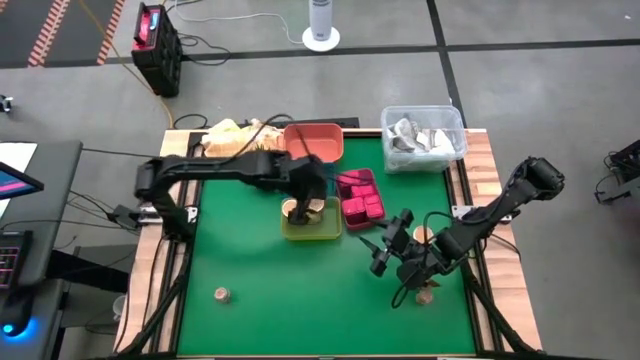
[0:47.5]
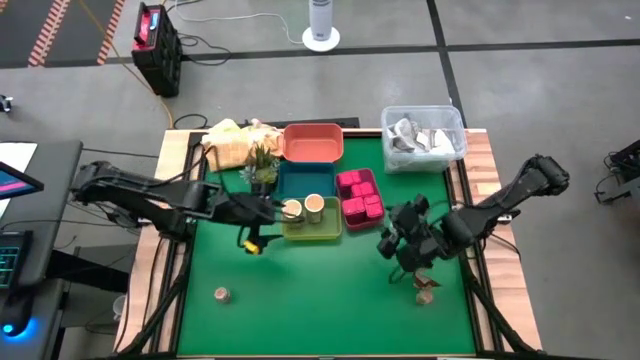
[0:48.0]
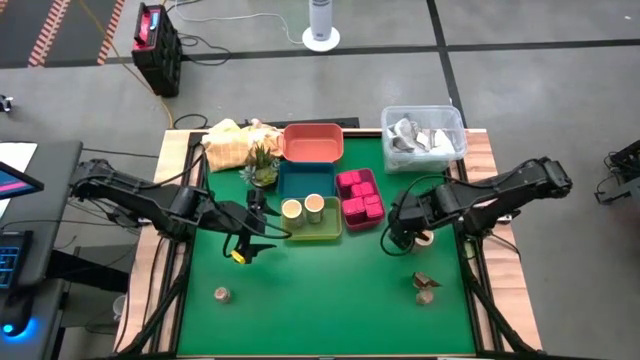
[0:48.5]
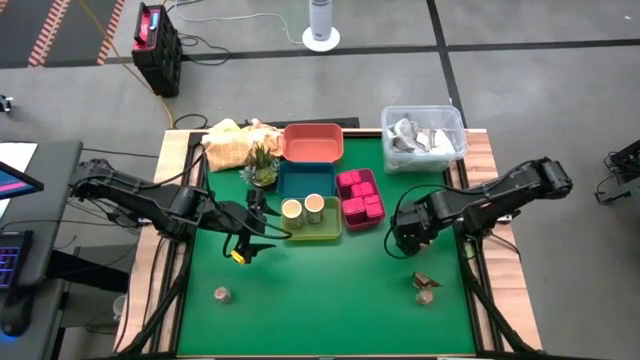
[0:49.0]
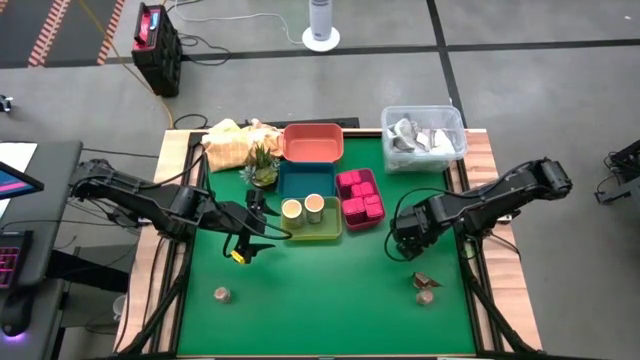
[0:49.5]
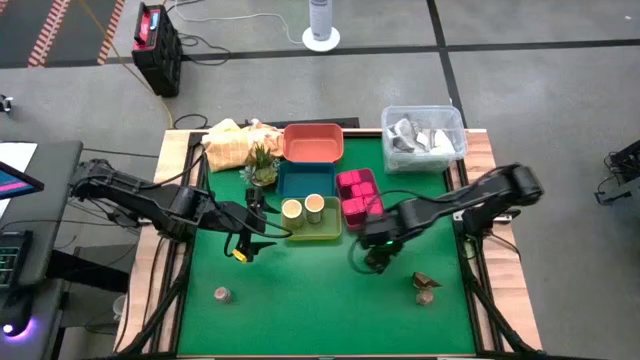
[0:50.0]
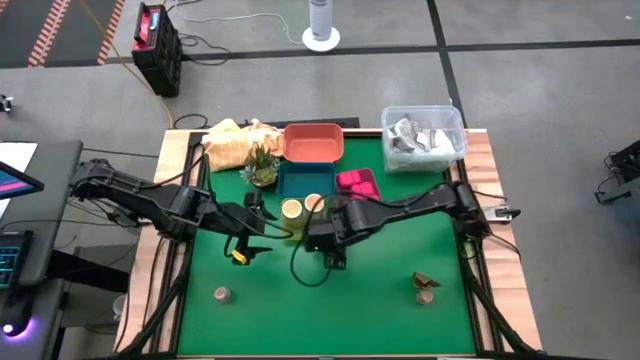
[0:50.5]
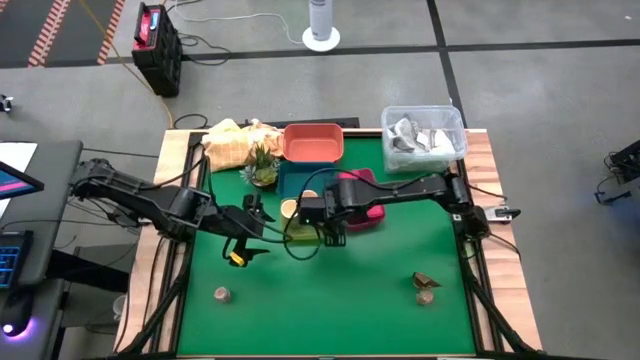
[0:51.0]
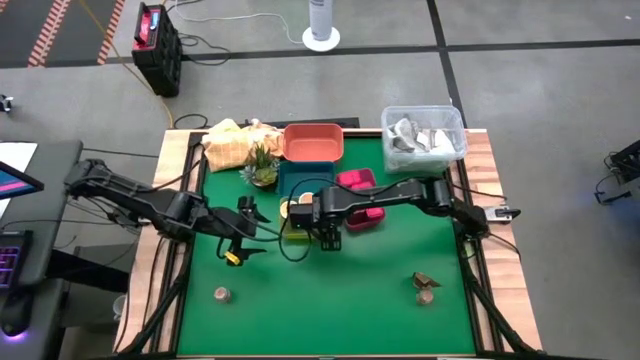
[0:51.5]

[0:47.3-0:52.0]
Task: Sort spices by type
Put the left gold seasoning bottle into the yellow bin

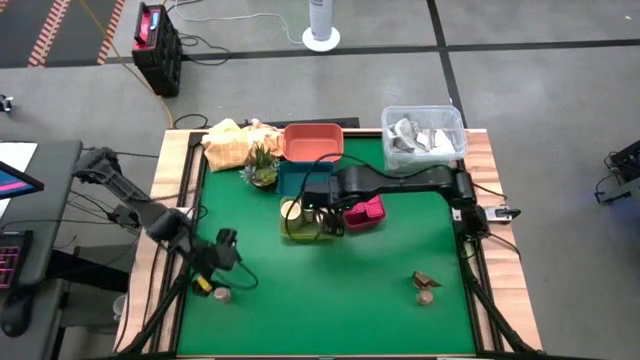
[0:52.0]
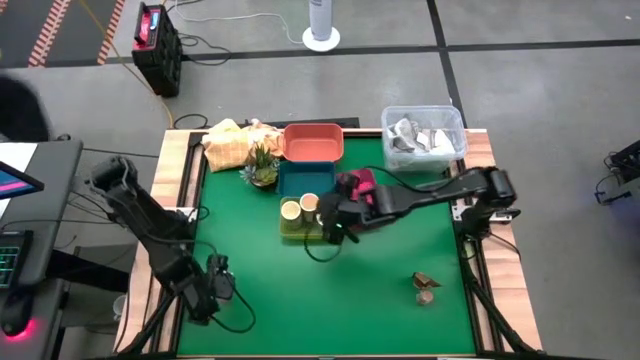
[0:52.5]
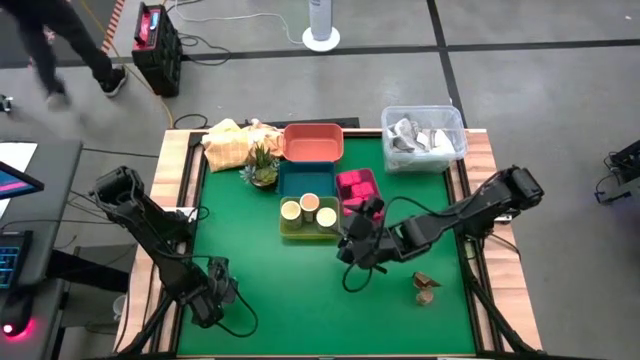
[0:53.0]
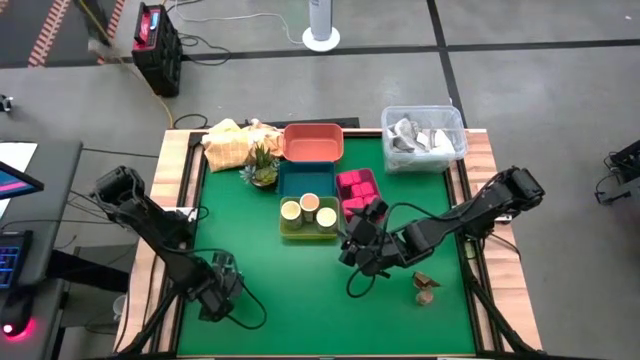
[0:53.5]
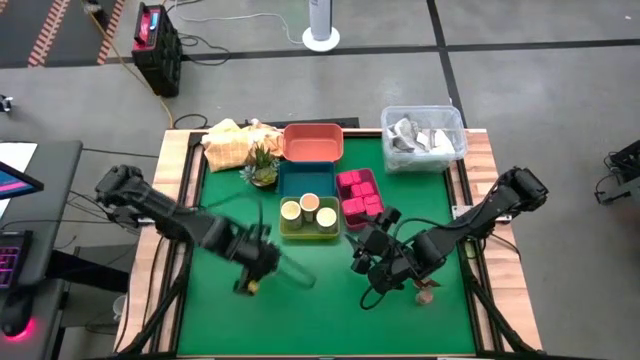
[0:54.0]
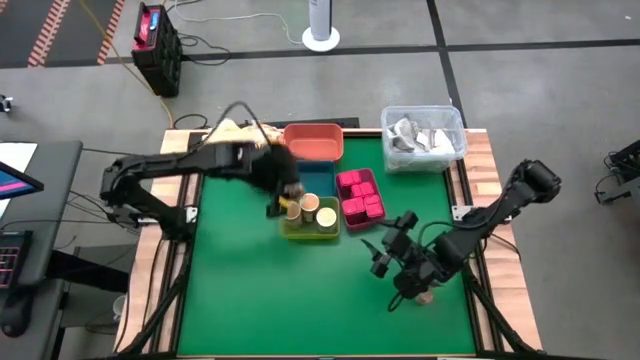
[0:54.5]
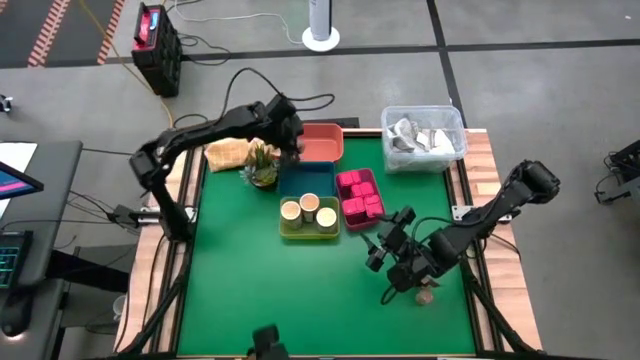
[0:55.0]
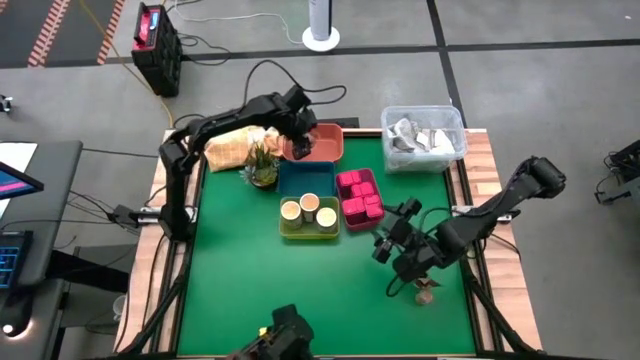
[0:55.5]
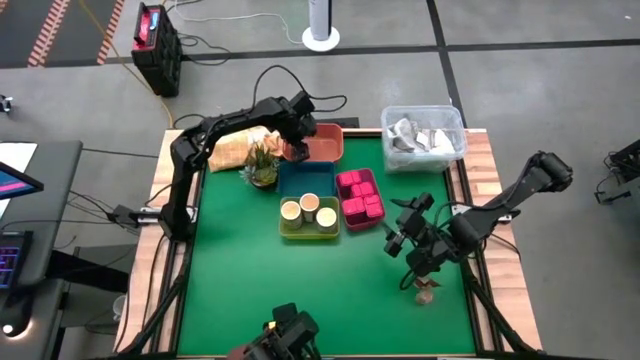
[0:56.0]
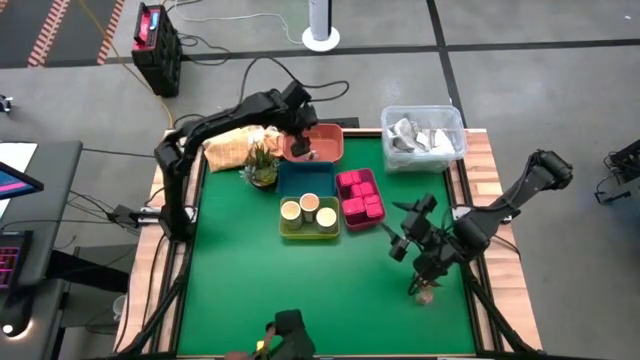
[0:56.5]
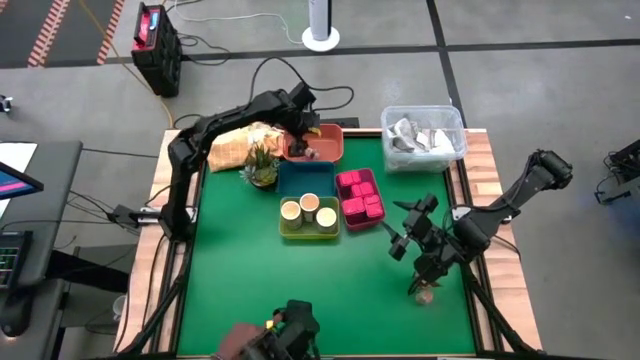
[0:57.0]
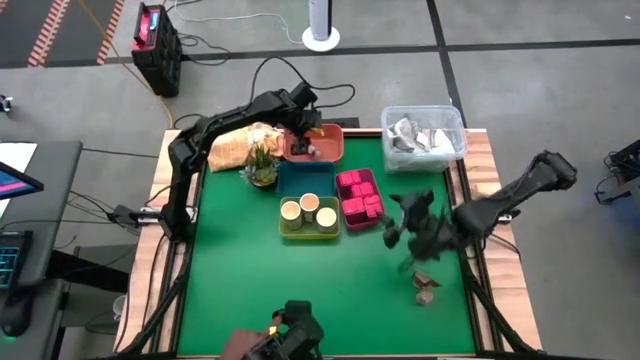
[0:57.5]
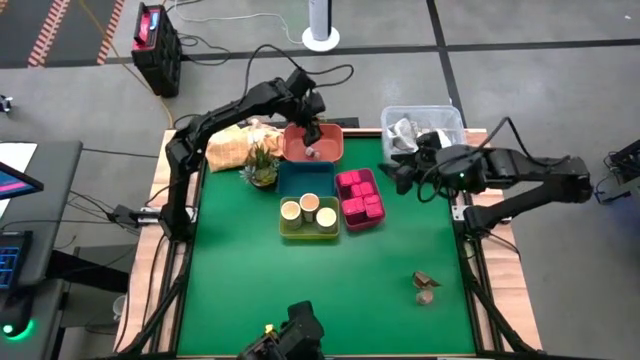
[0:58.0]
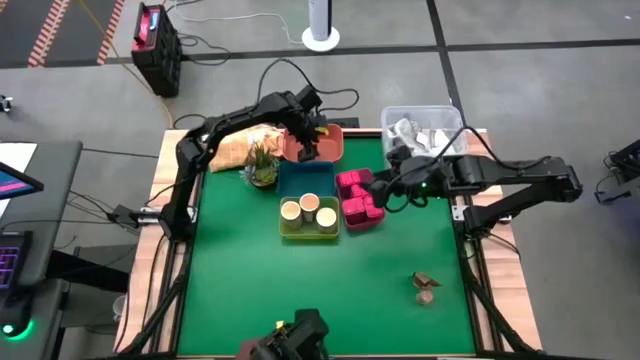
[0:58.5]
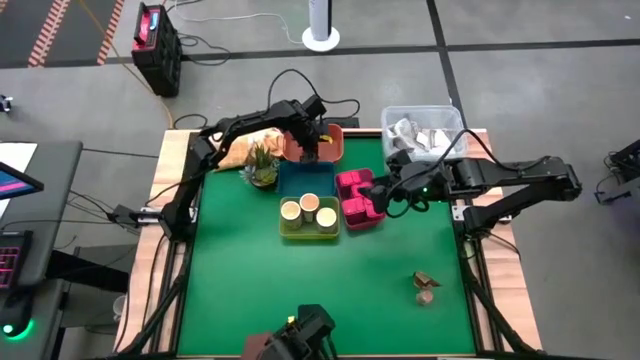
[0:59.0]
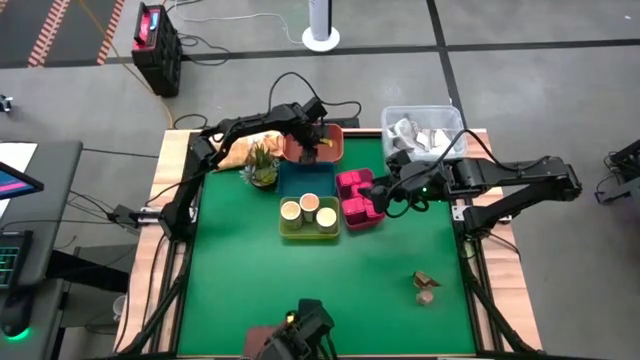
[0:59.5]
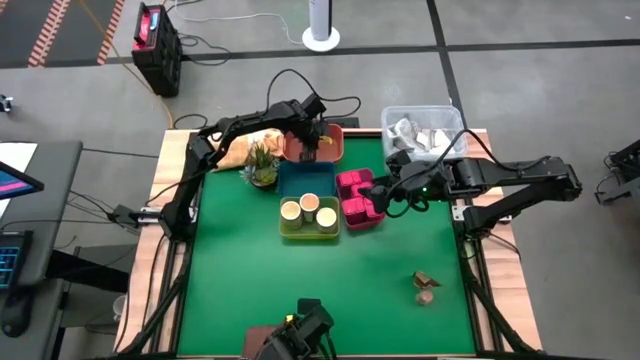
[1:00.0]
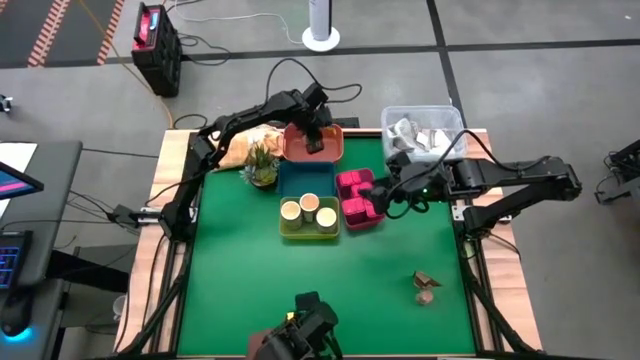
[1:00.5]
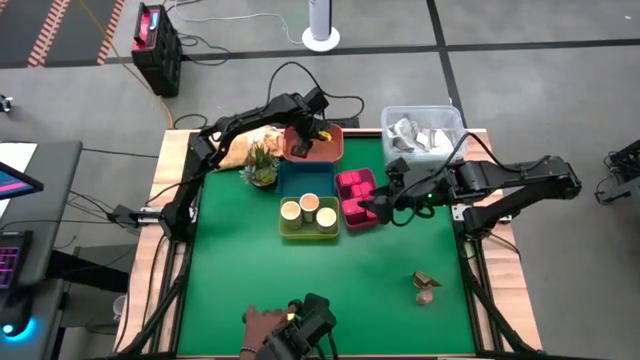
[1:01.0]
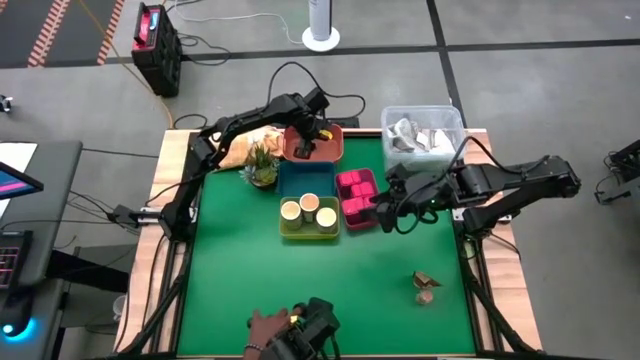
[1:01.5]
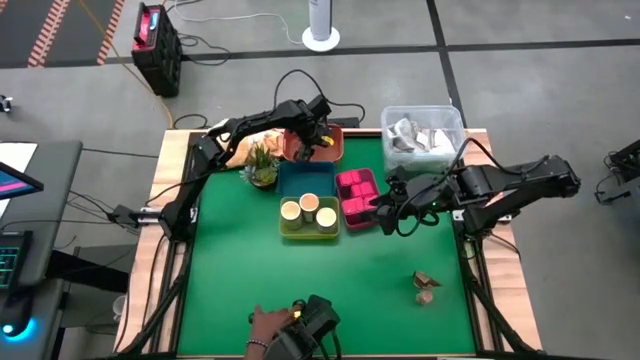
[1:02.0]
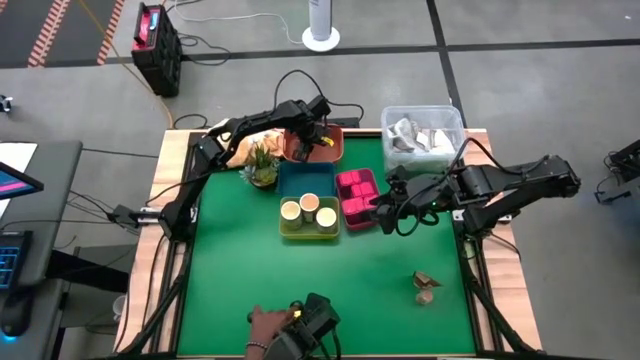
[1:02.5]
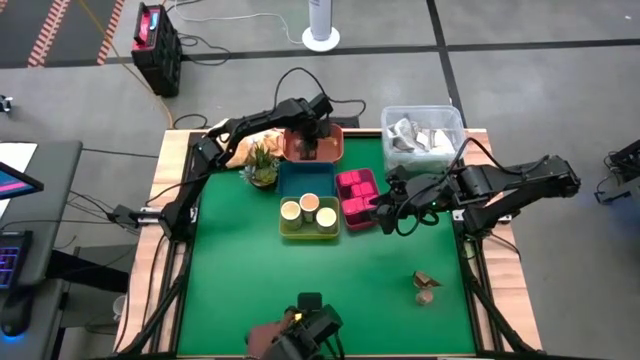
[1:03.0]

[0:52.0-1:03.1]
Put the left brown seasoning bottle into the orange bin

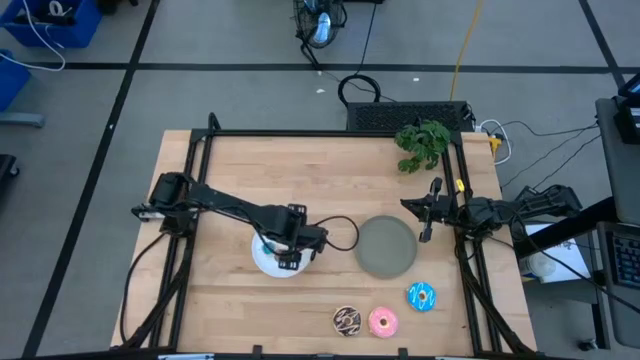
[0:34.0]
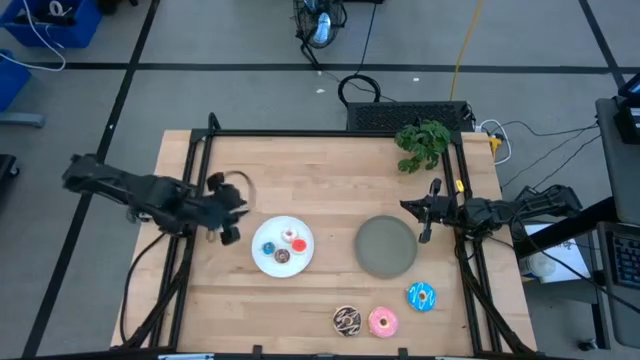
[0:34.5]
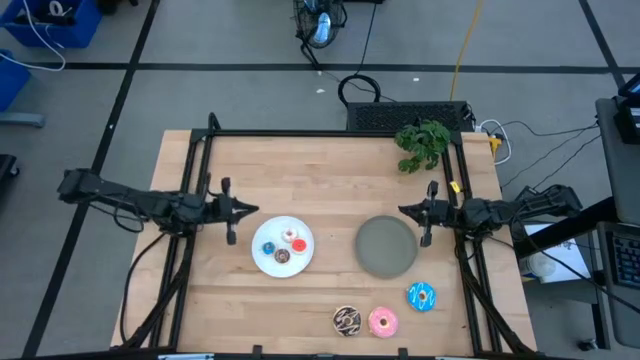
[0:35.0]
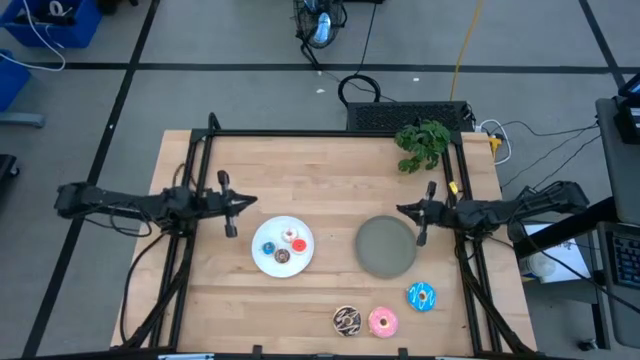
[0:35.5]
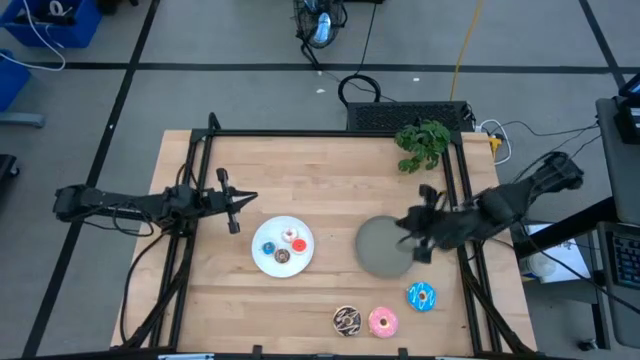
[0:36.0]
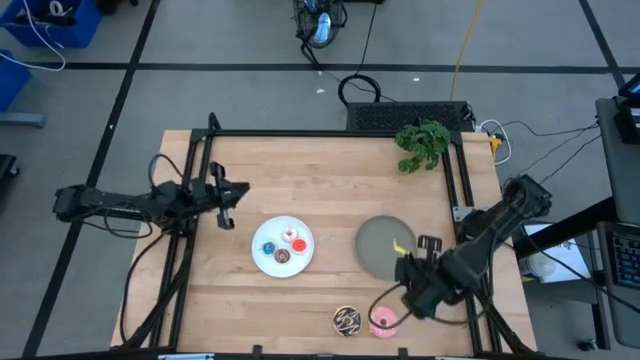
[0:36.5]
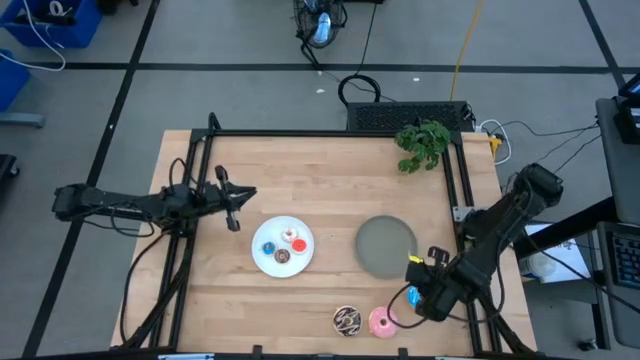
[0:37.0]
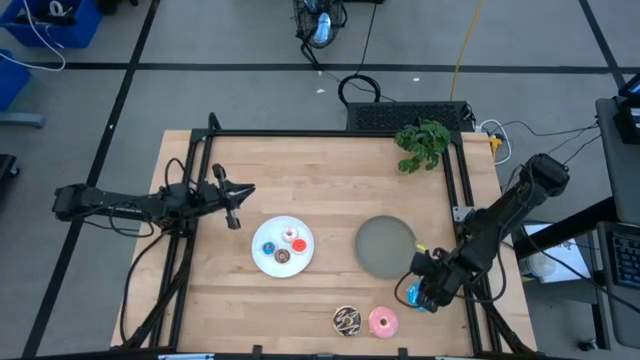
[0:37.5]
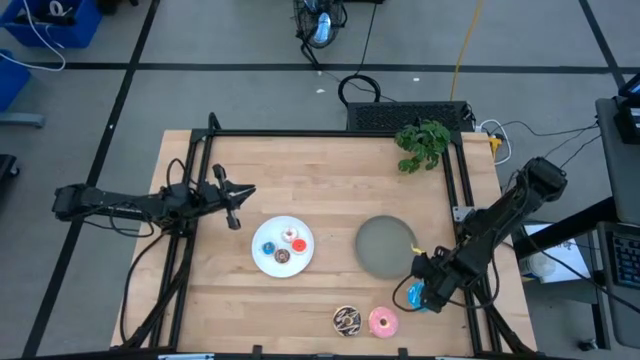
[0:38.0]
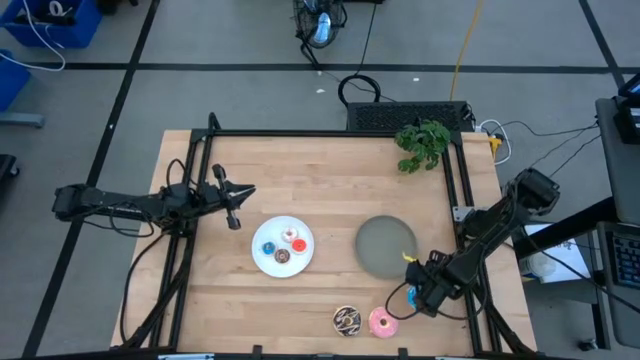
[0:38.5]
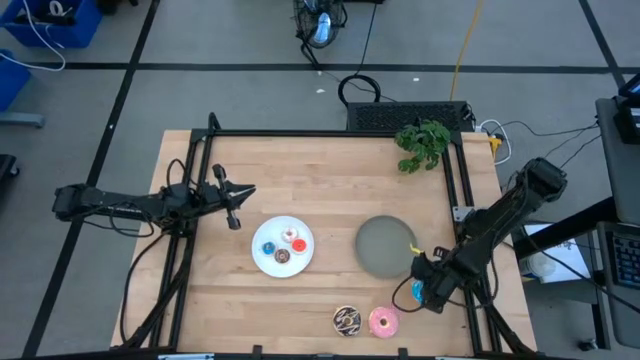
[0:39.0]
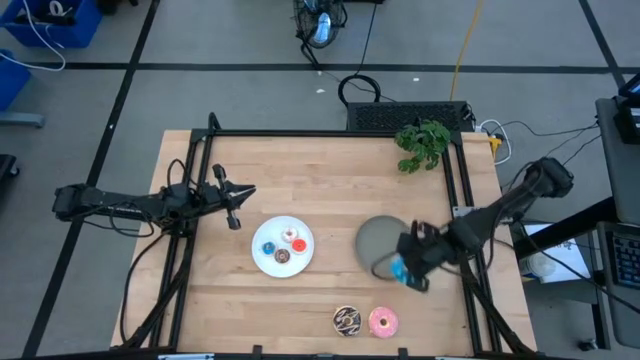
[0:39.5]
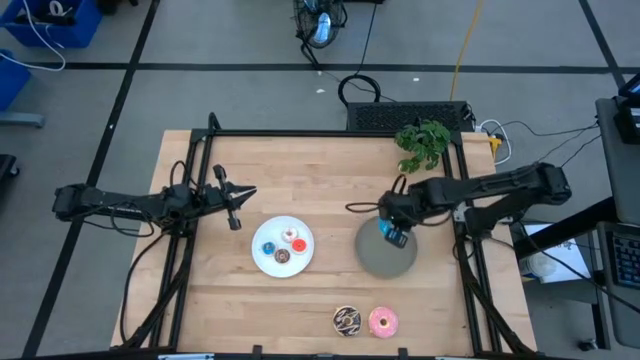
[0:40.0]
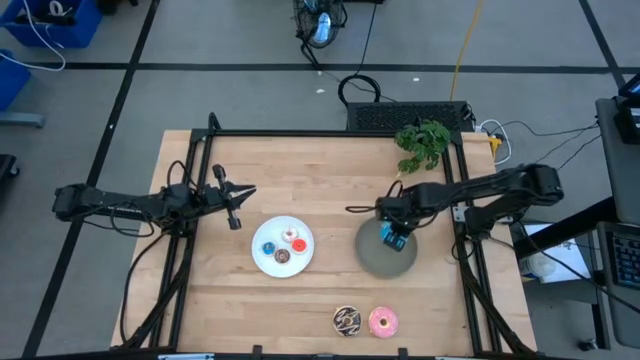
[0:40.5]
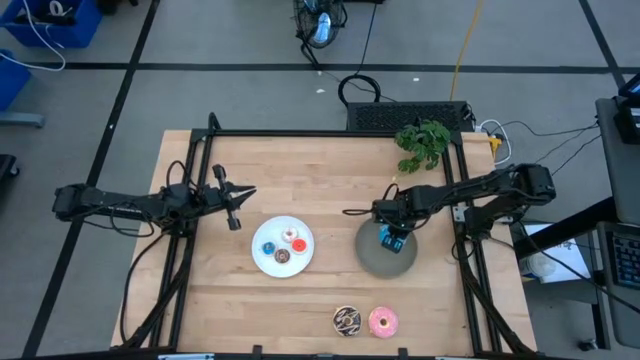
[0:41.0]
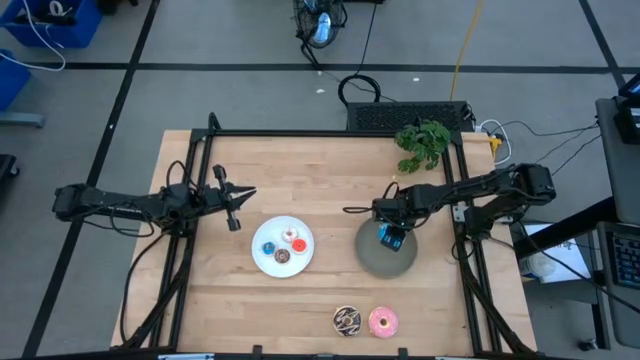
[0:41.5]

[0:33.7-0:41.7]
Task: Pick & Place donuts
Put the large blue donut on the gray plate
